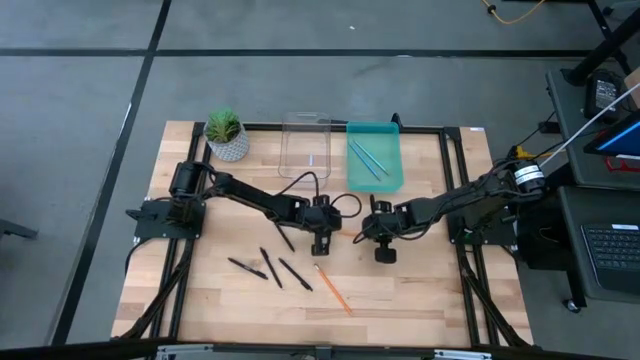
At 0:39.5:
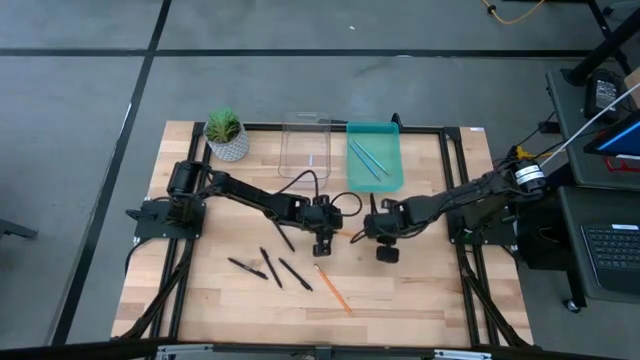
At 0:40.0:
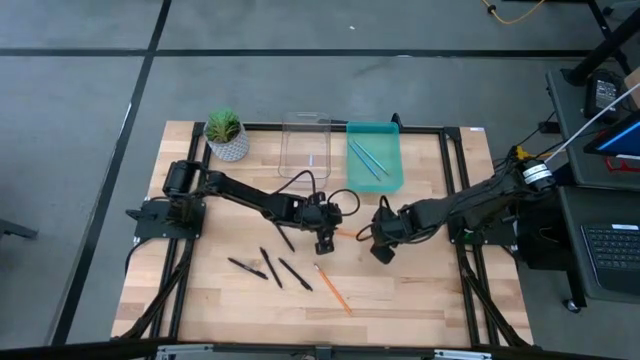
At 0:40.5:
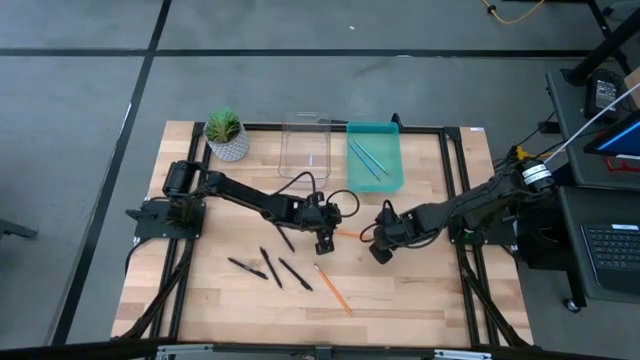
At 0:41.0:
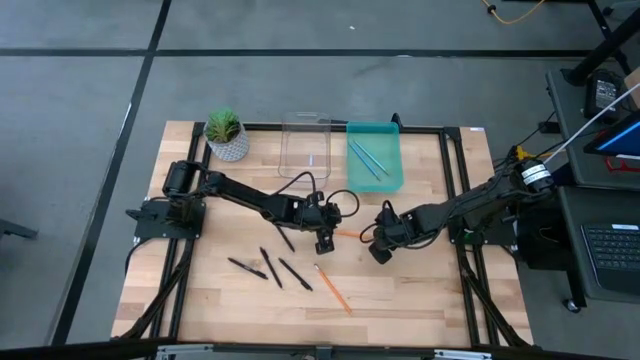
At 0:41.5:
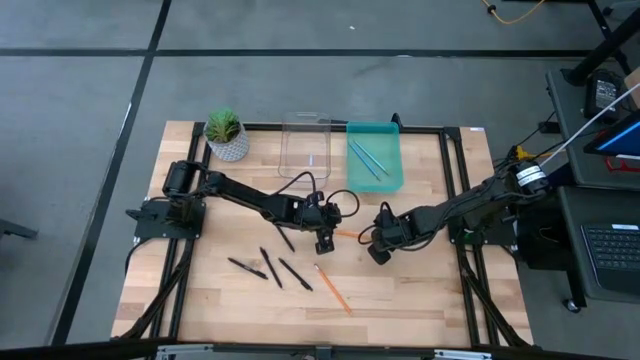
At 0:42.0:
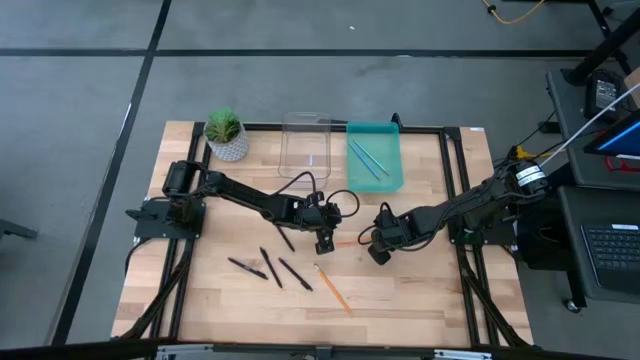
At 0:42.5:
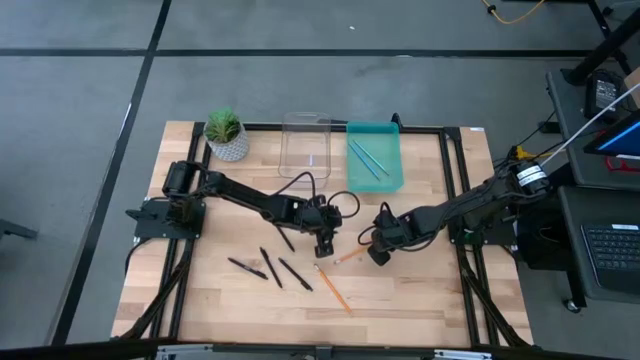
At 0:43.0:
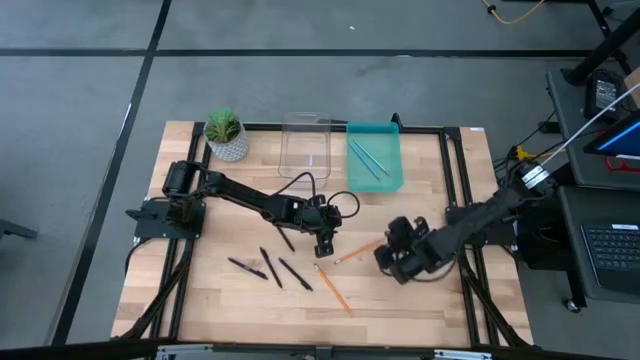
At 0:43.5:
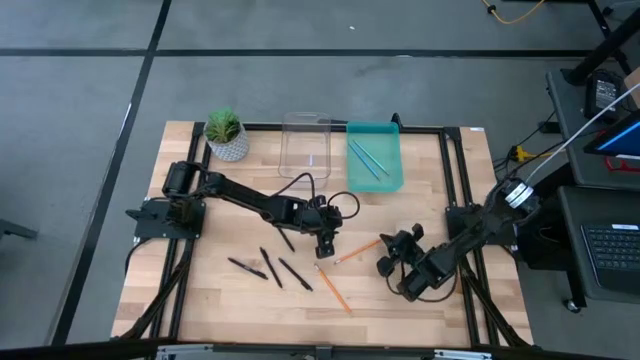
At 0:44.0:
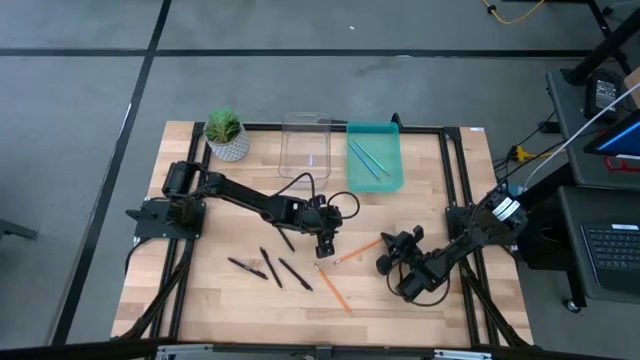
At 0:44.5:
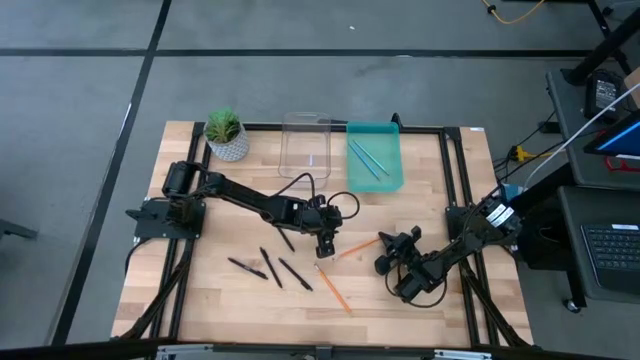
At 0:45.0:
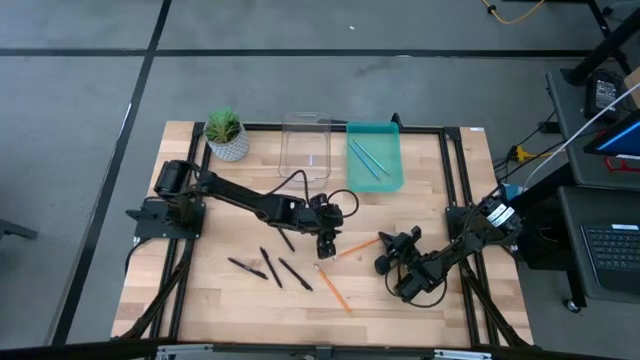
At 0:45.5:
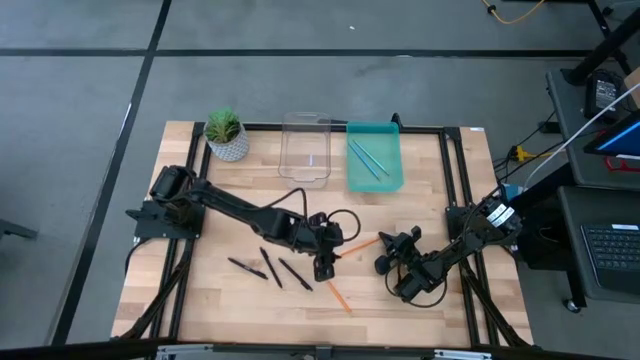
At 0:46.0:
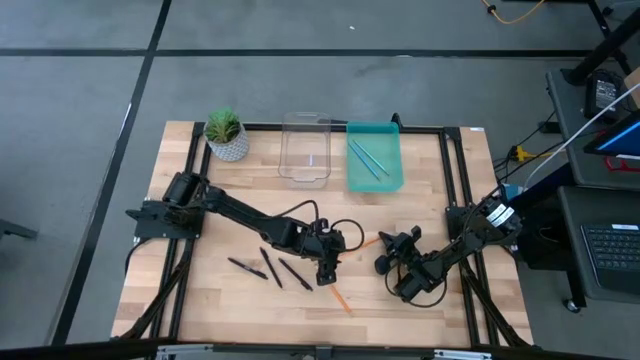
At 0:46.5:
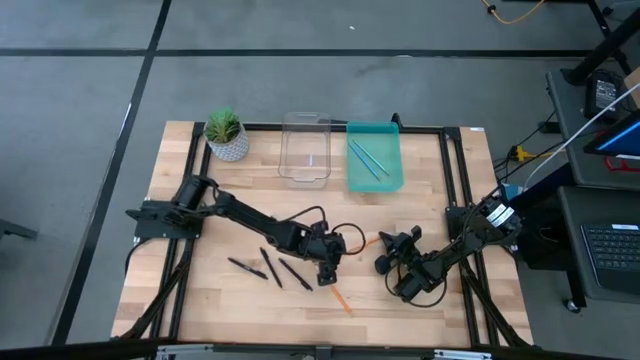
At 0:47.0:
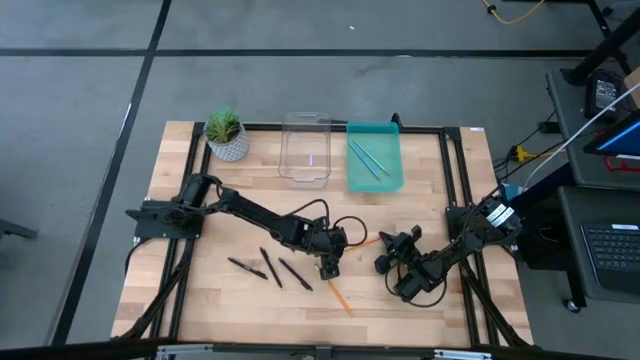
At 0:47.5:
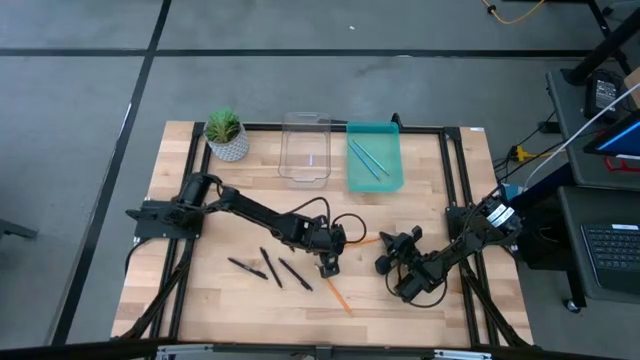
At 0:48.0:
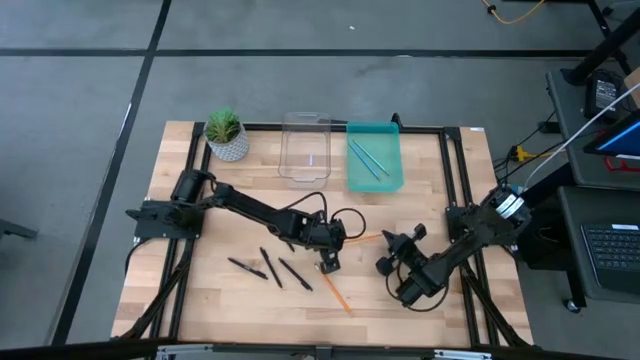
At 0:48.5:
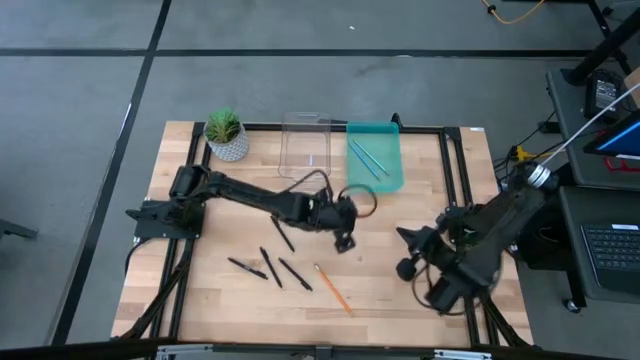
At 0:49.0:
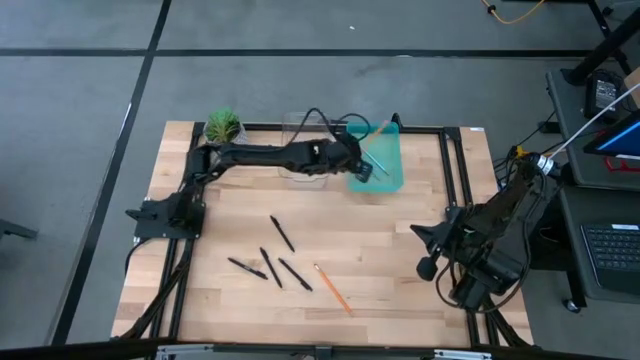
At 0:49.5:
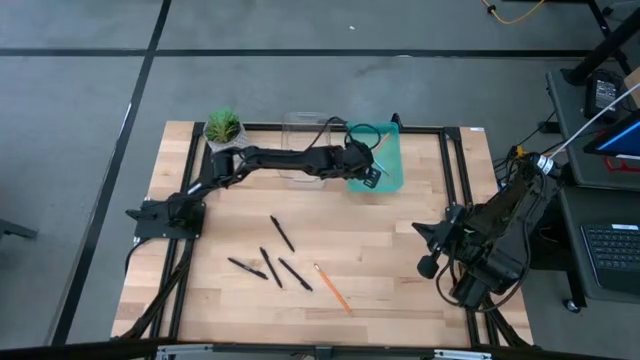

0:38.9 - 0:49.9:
Task: Sort pens & pencils
Put the orange pencil into the blue bin

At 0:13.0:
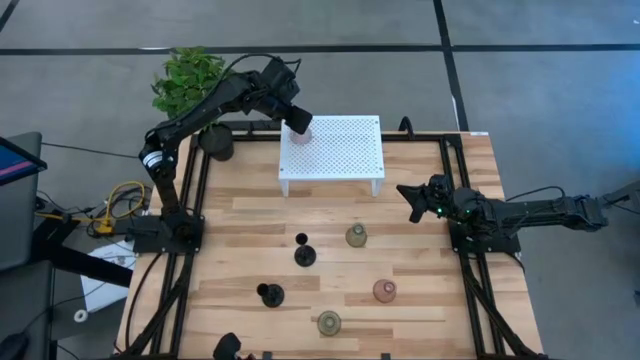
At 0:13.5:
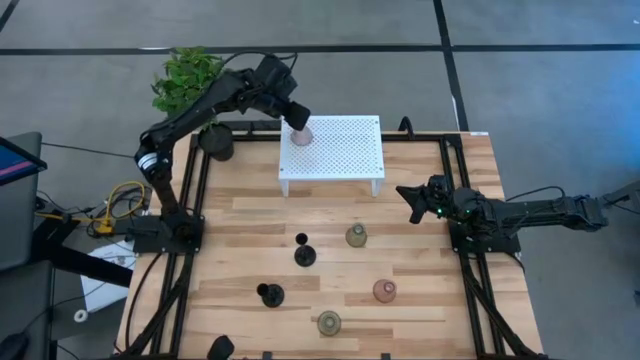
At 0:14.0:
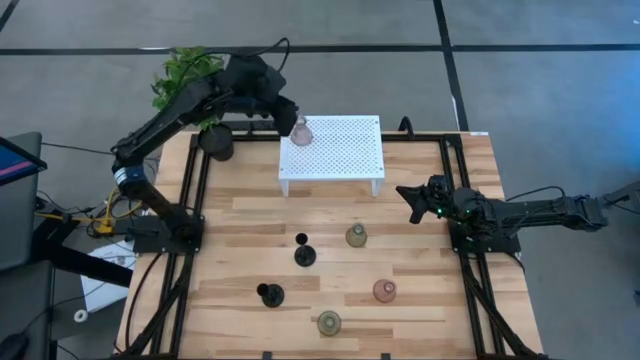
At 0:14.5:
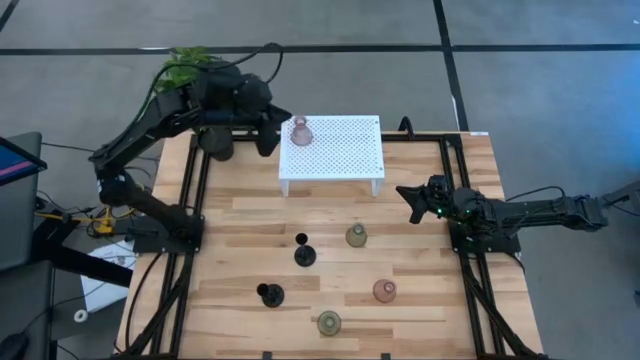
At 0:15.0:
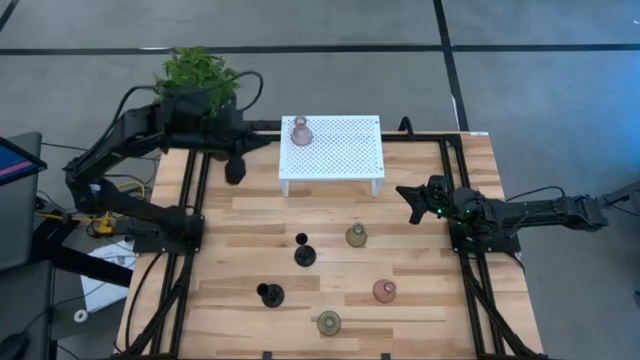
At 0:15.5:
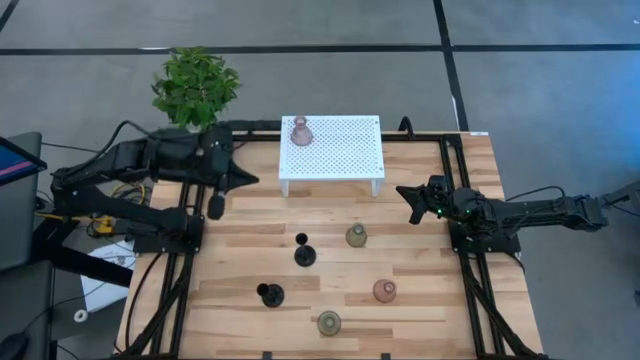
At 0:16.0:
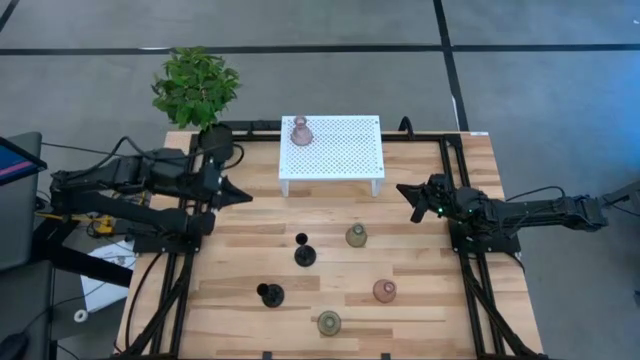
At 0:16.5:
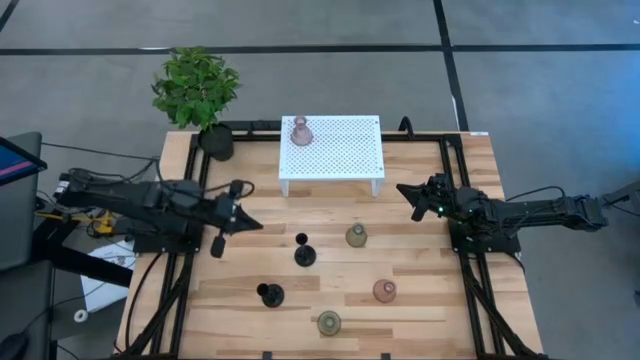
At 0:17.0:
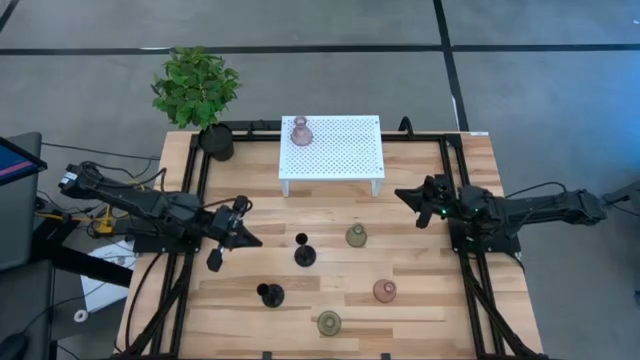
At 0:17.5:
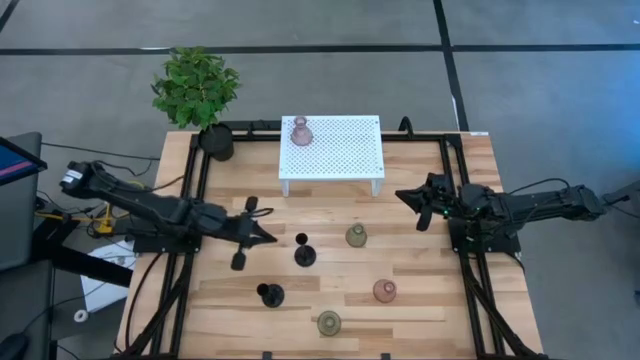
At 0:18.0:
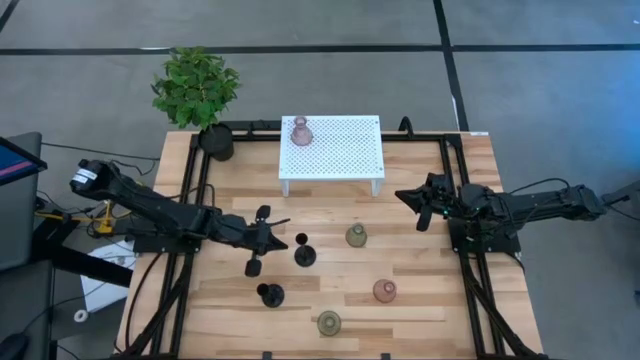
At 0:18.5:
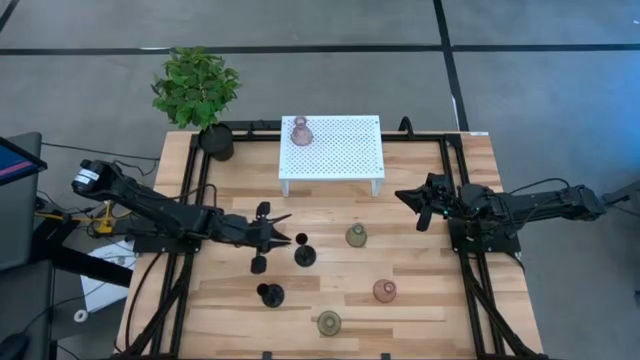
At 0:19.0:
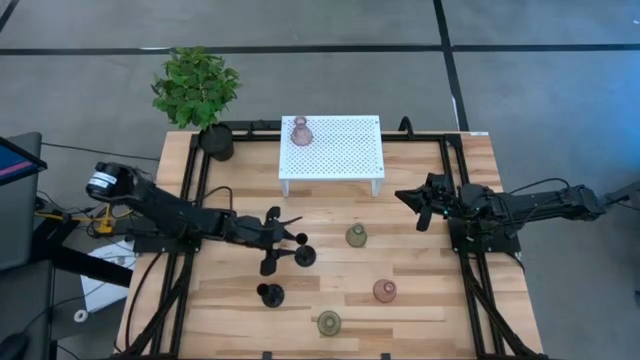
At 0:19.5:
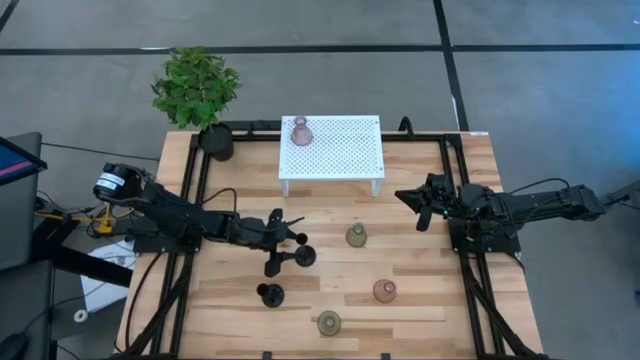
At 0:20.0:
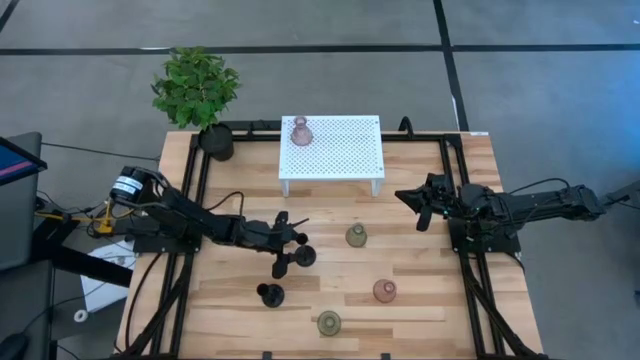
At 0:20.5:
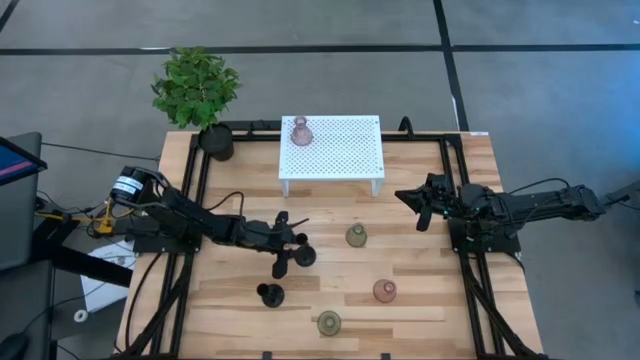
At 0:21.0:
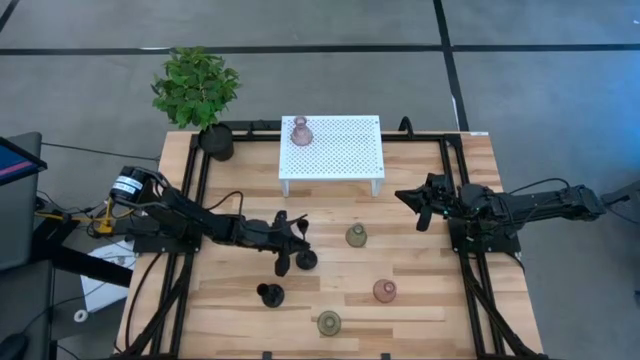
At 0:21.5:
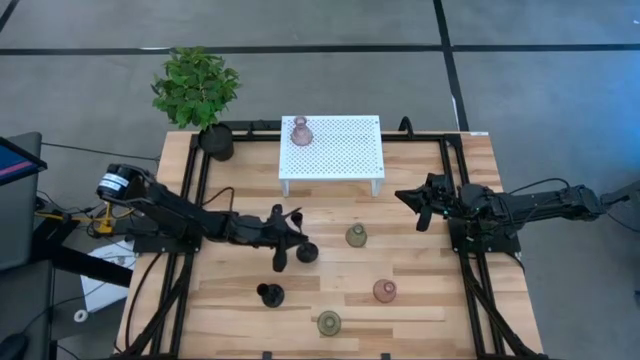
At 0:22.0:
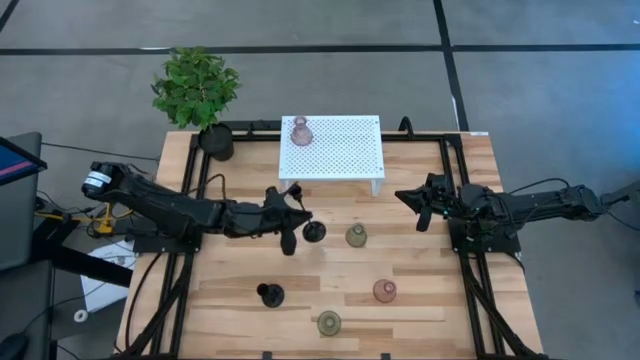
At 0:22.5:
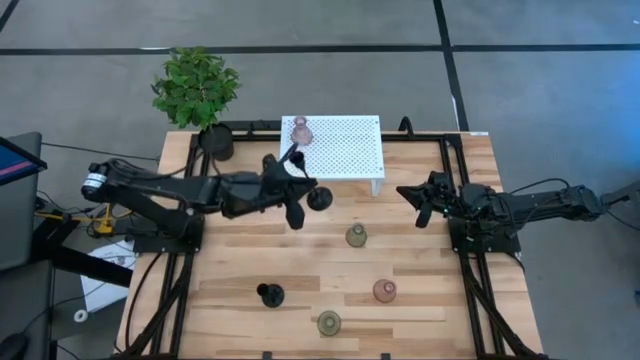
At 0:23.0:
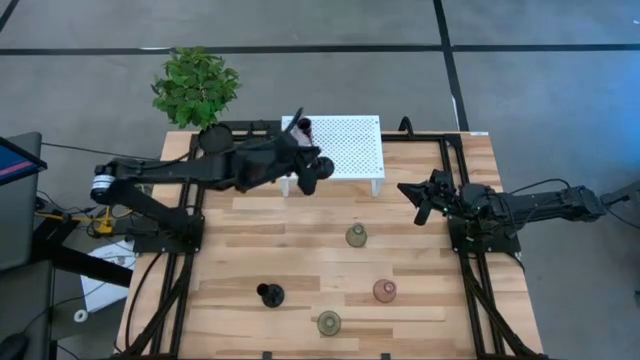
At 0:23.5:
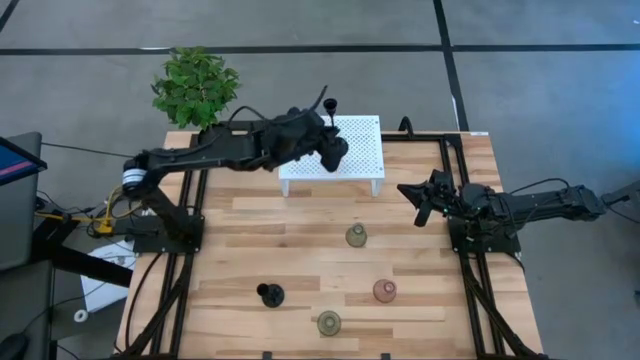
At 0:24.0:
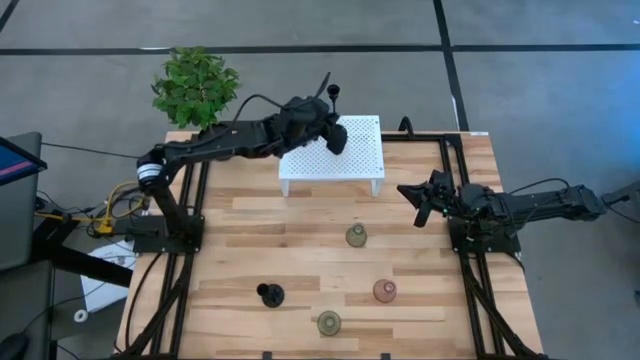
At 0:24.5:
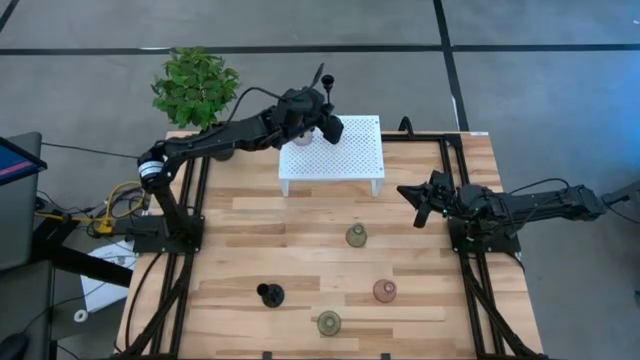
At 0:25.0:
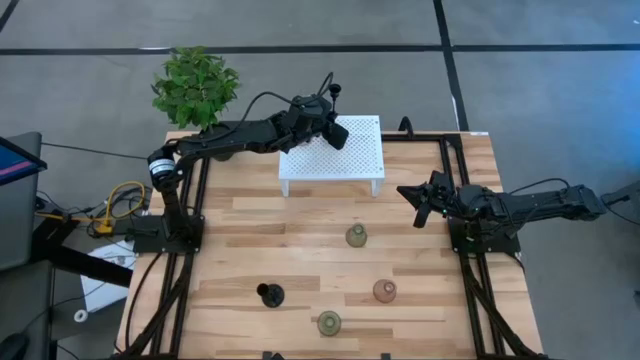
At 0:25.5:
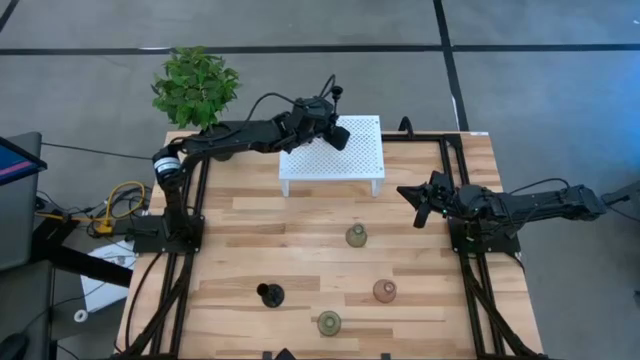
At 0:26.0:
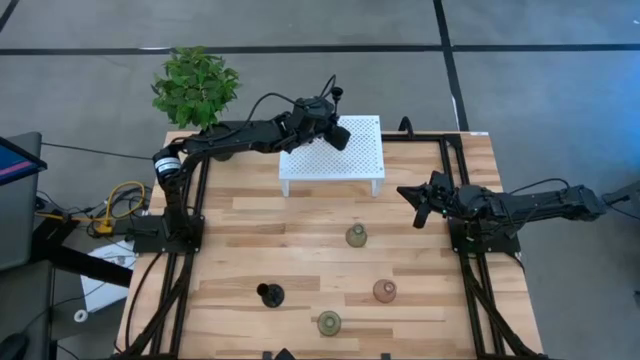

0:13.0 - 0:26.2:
Task: Pick & Place candle stick holders
Put the top black candle holder on the shelf
